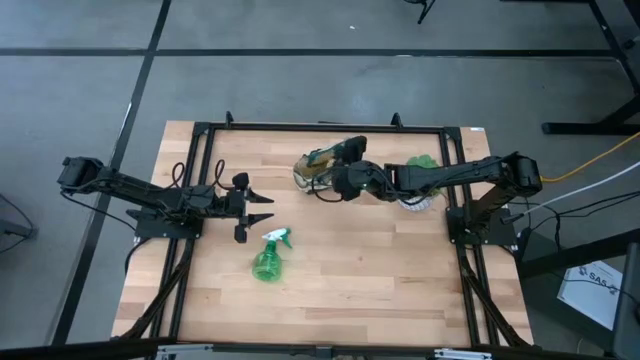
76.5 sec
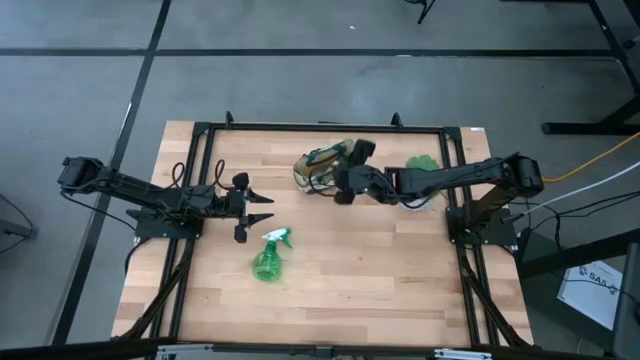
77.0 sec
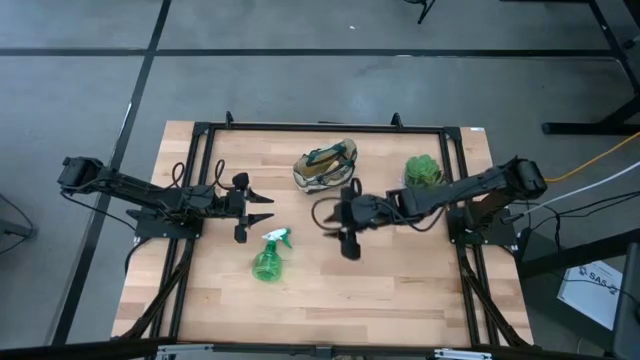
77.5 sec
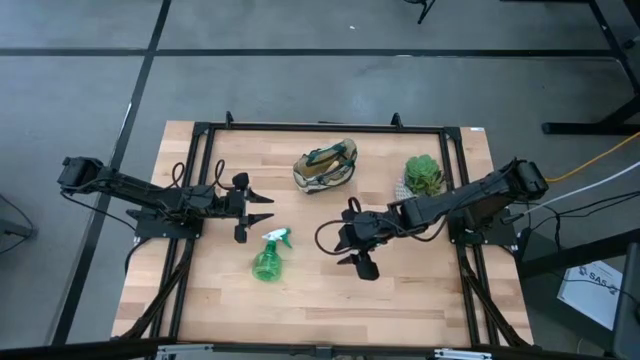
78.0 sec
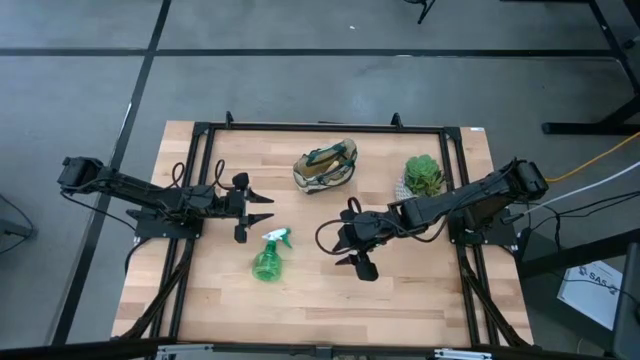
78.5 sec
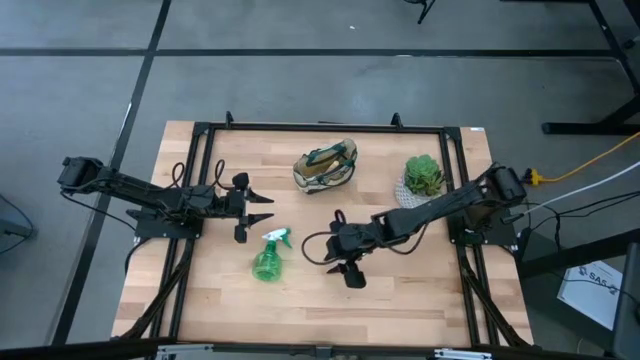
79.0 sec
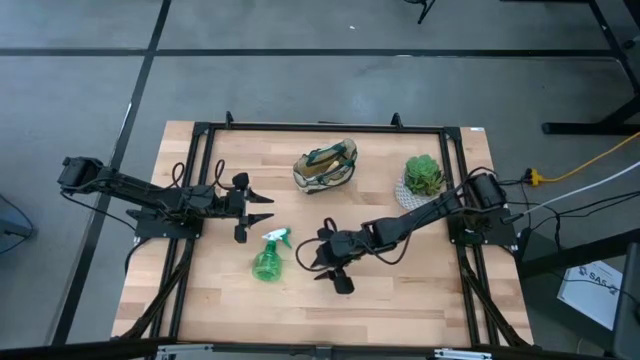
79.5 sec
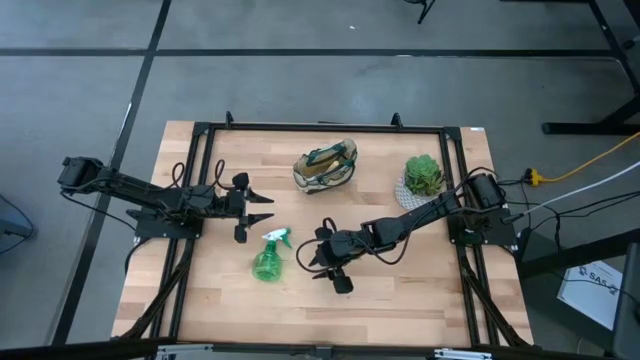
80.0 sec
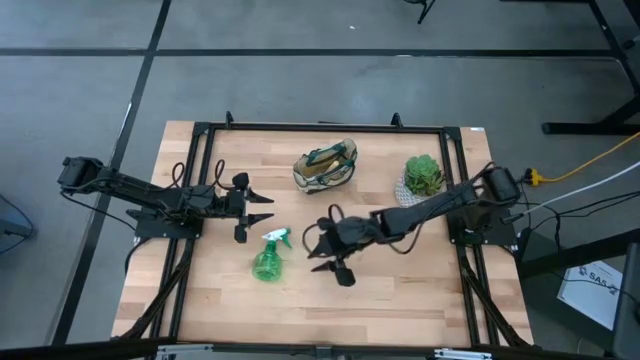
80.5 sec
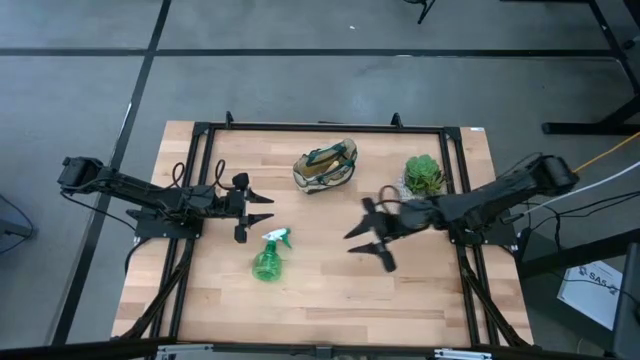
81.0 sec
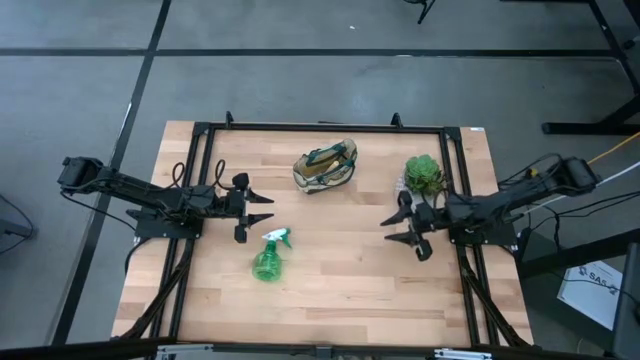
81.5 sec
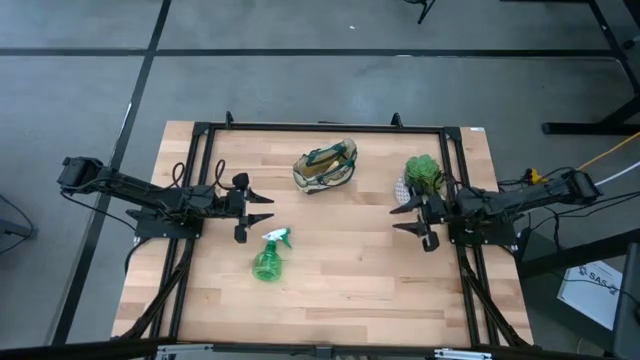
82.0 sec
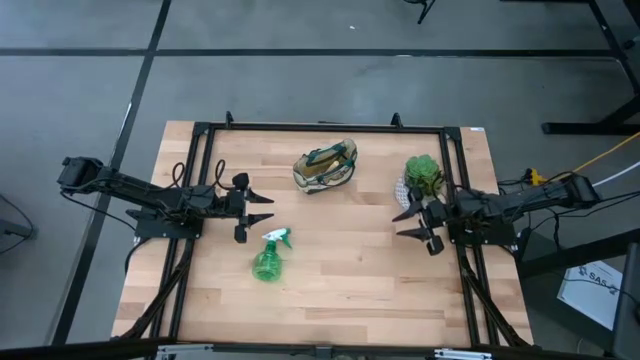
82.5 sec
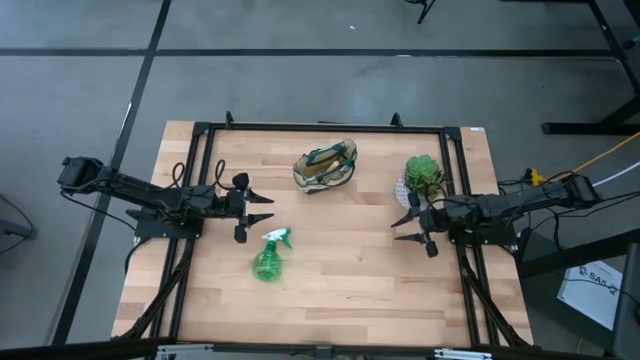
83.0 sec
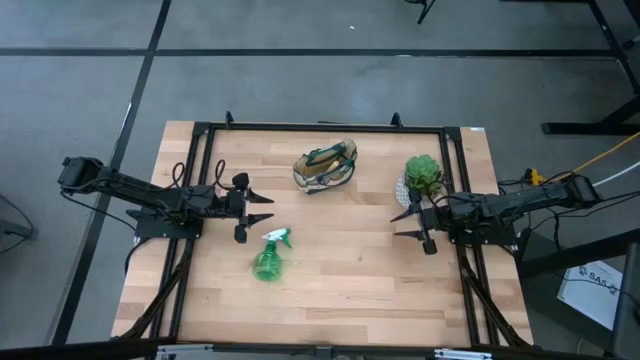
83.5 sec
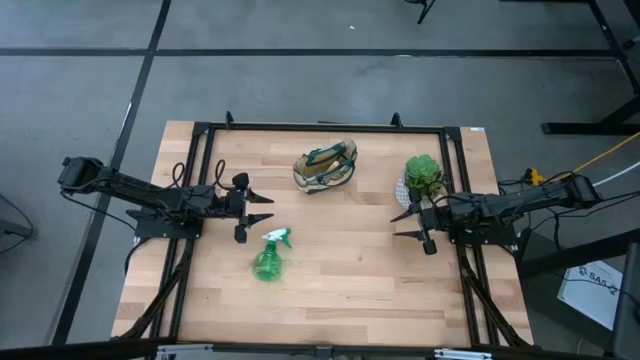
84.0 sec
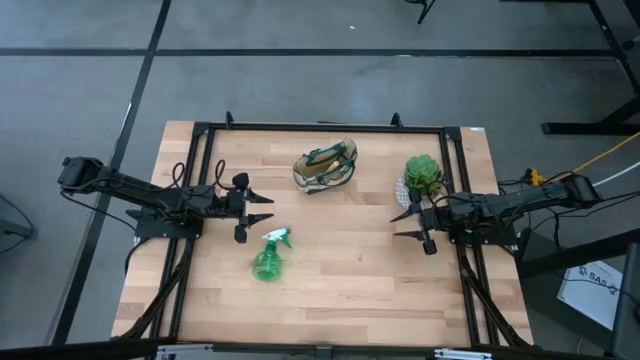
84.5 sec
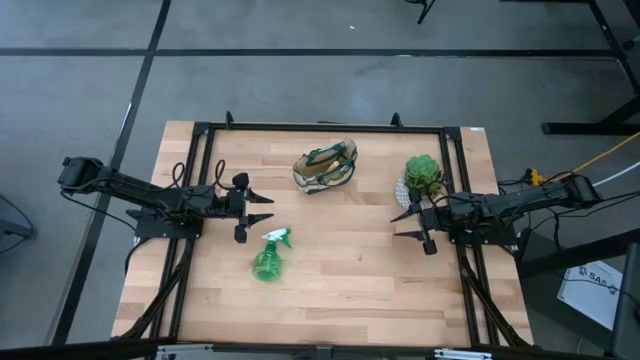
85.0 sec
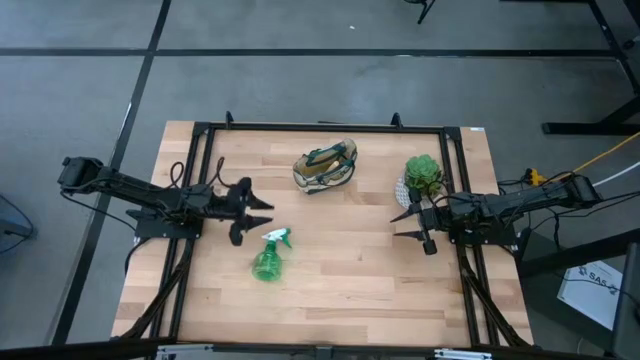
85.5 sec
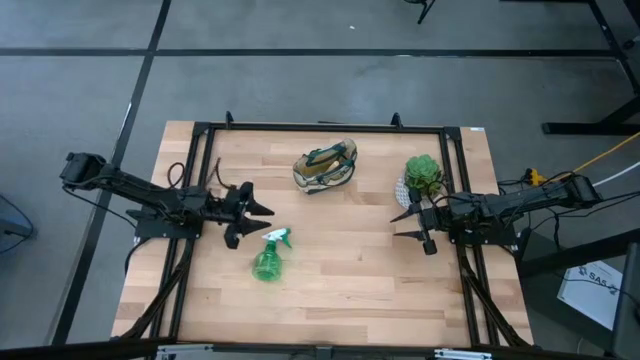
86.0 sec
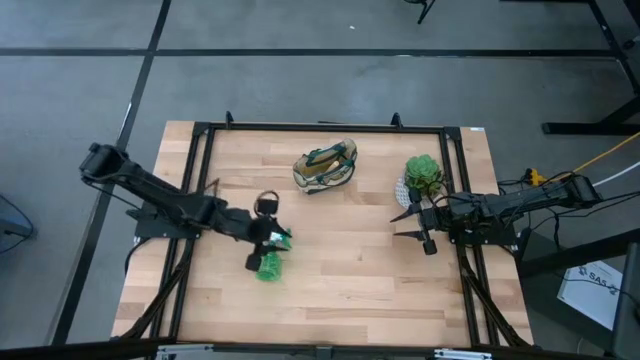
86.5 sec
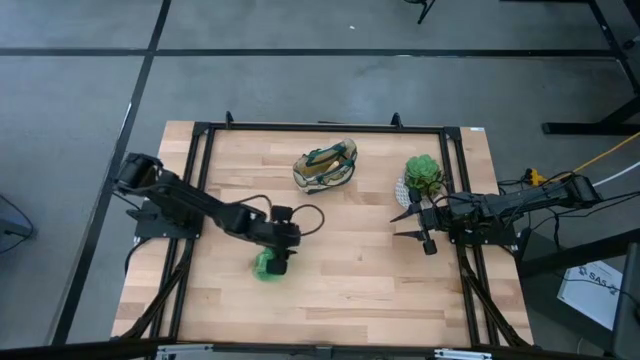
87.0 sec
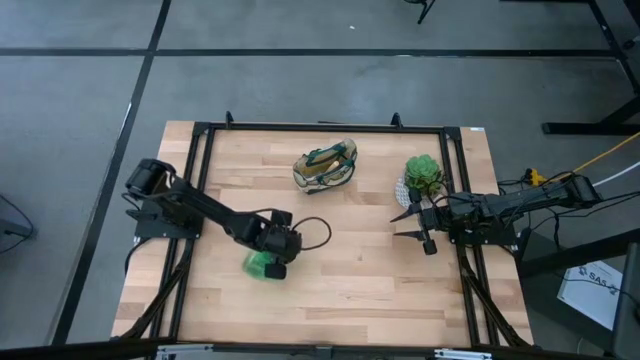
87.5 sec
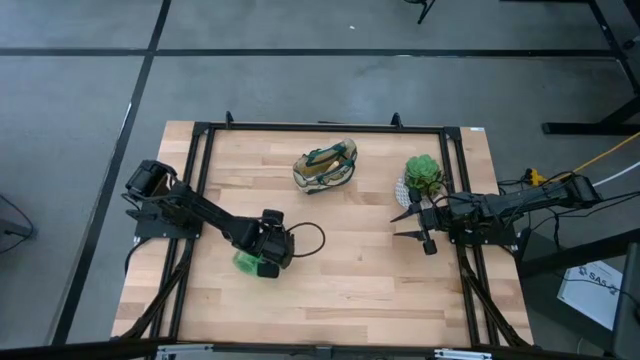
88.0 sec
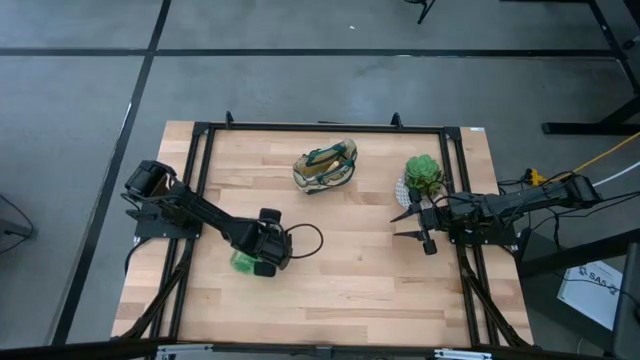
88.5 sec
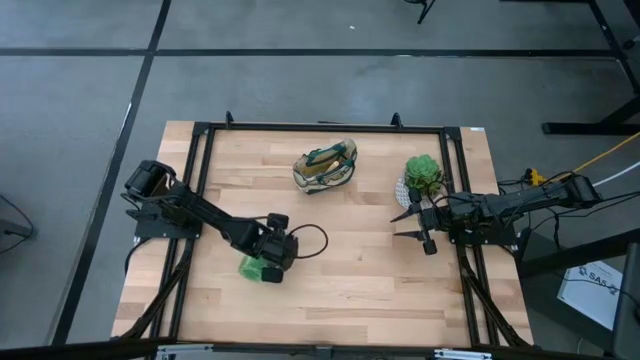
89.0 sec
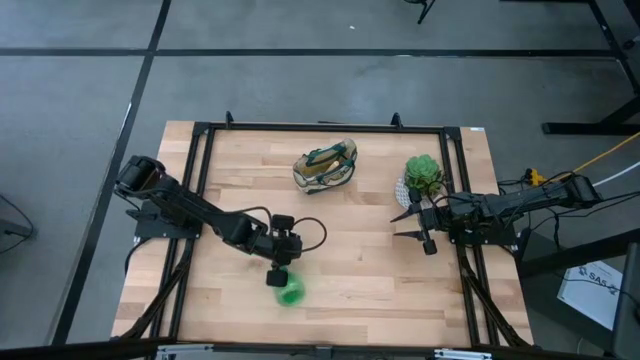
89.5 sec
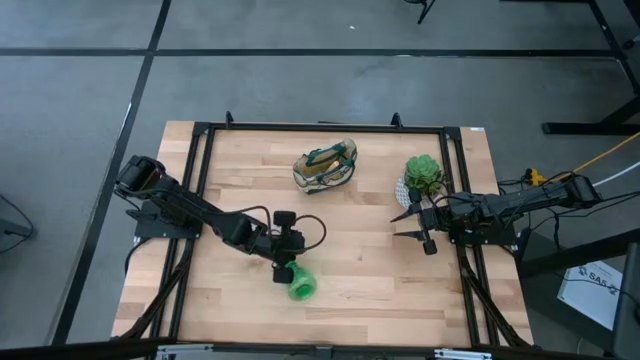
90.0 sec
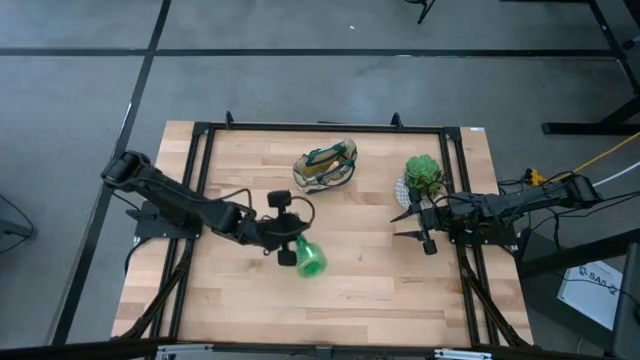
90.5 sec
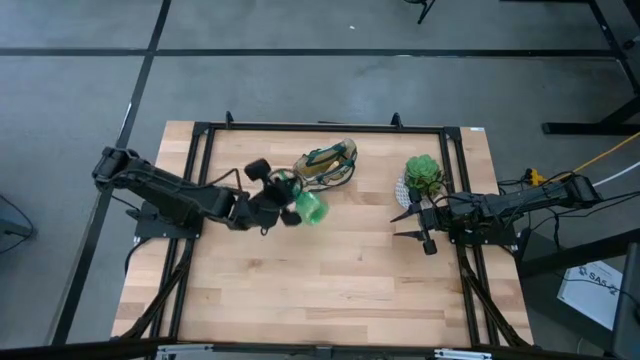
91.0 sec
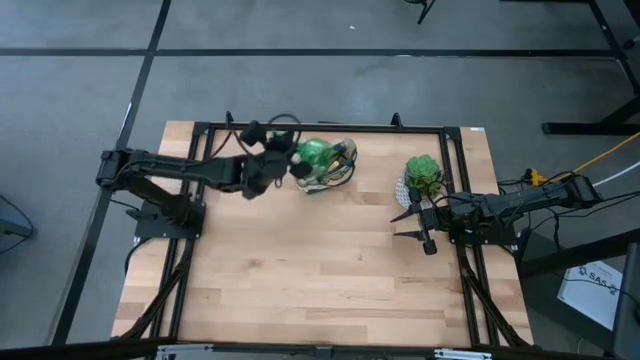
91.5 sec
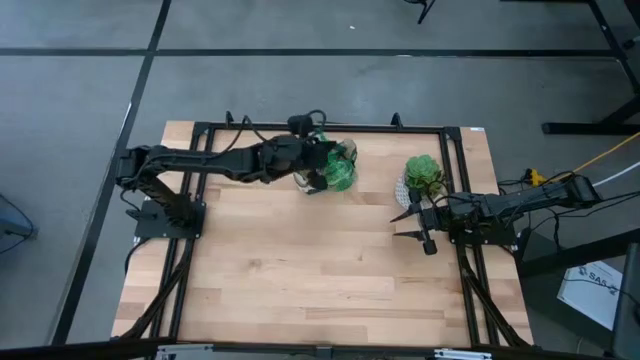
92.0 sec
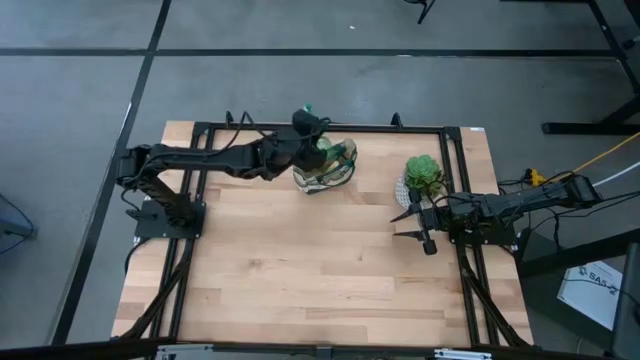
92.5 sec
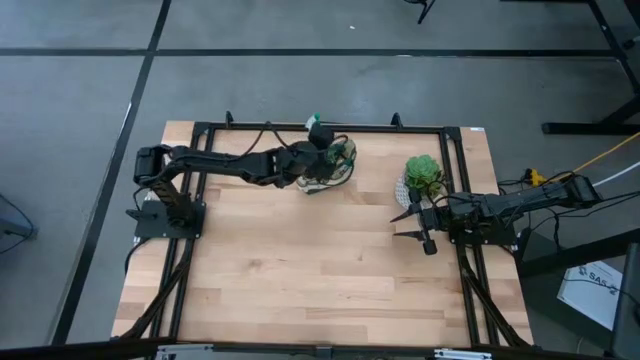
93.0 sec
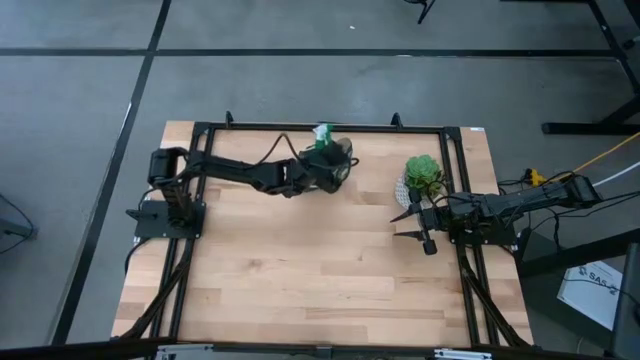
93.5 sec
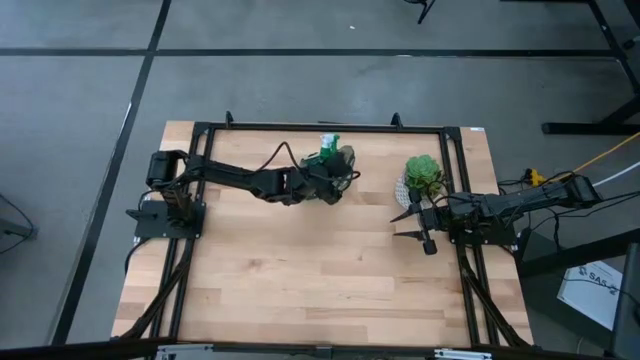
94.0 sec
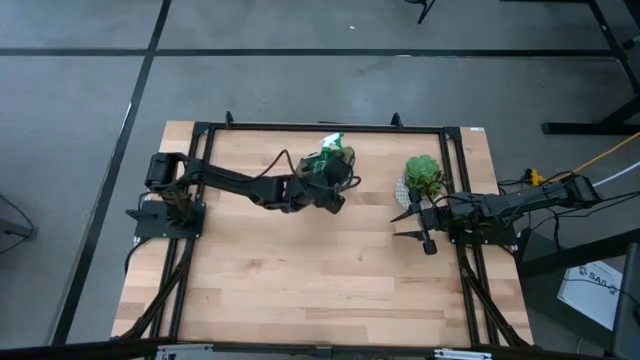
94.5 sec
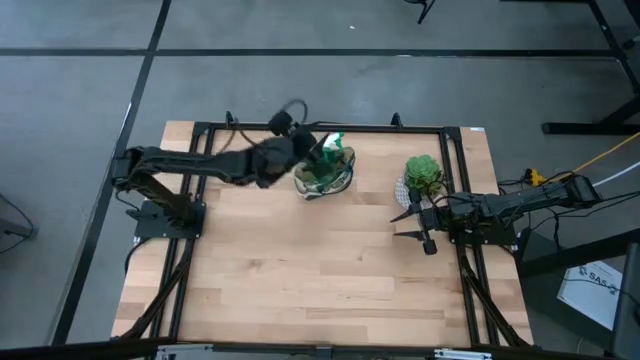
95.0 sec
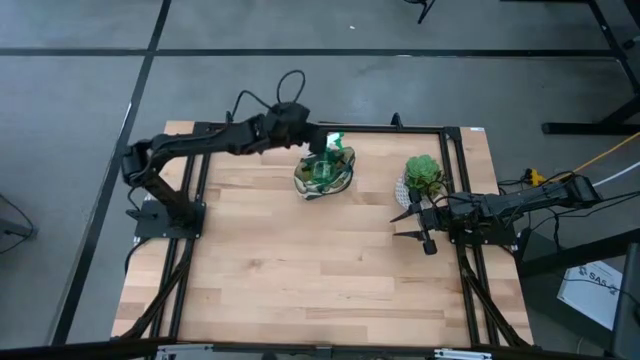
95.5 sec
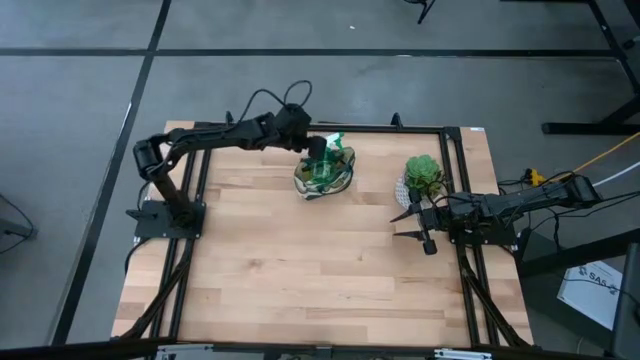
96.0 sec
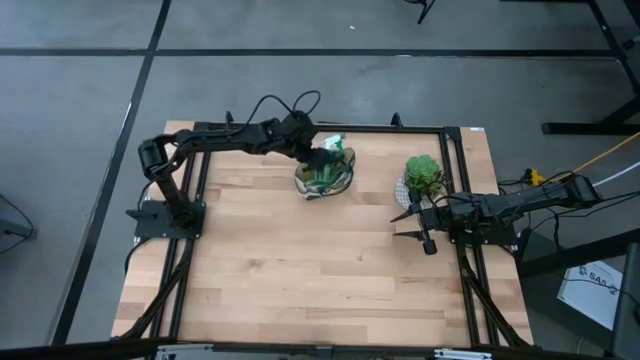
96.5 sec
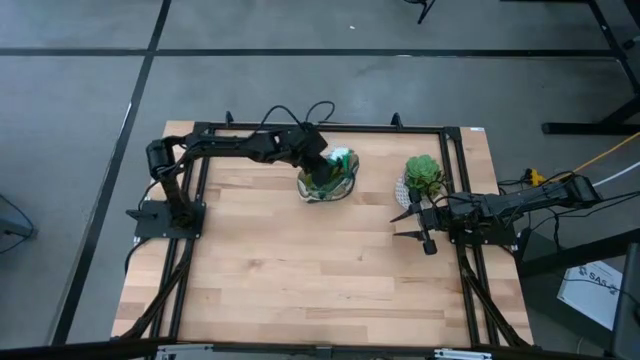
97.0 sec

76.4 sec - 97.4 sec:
Task: Pick & Place Garden tools in Gardening bag
Put the spray bottle into the gardening bag
